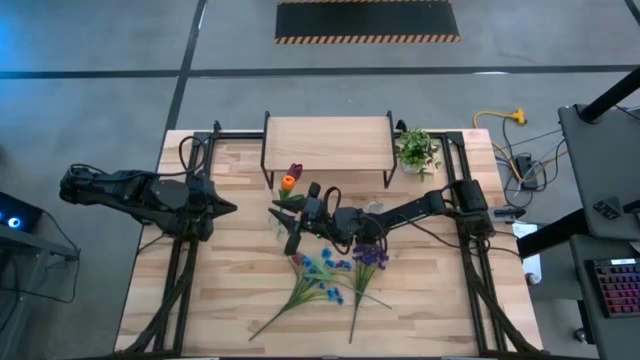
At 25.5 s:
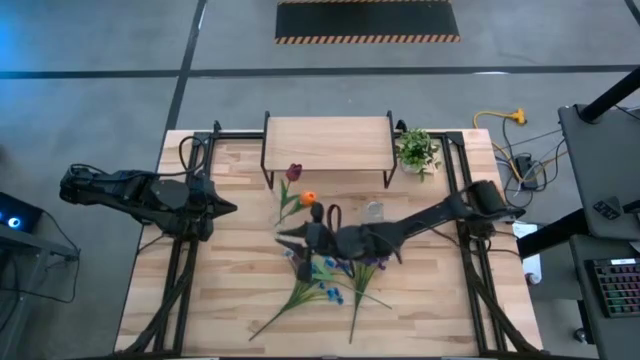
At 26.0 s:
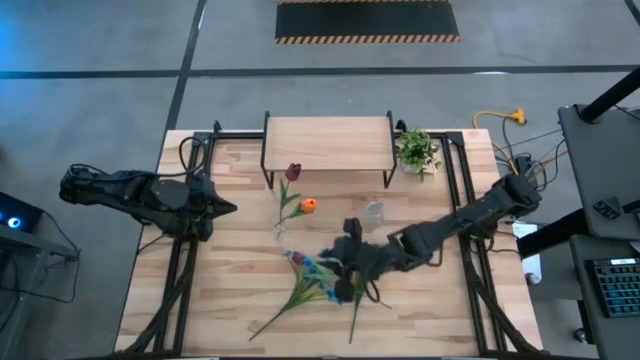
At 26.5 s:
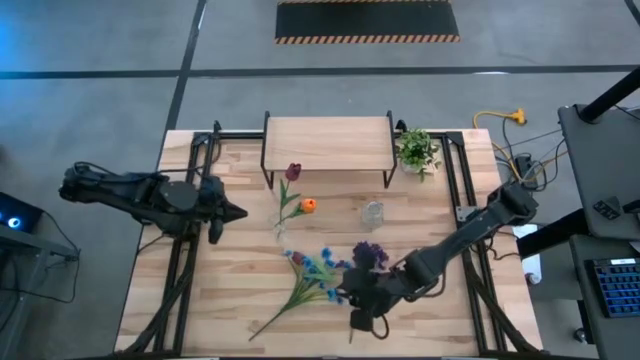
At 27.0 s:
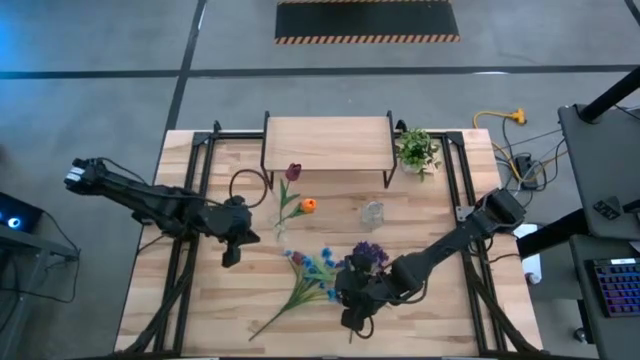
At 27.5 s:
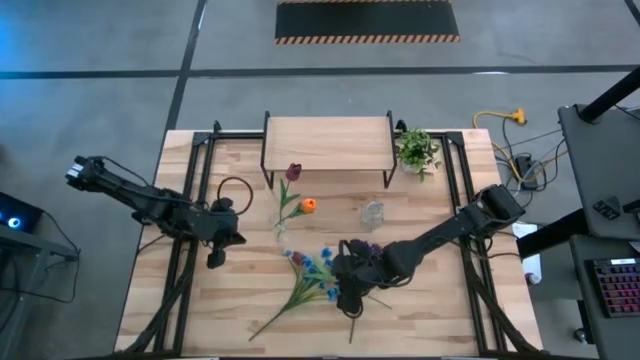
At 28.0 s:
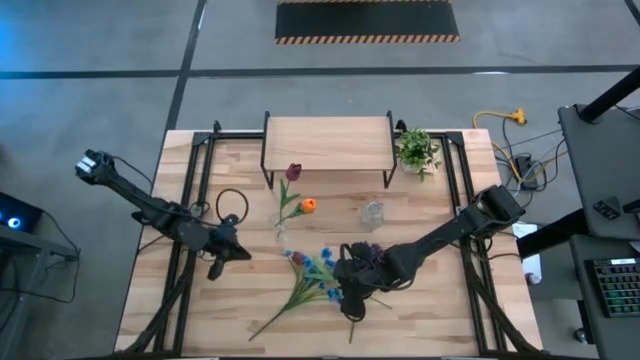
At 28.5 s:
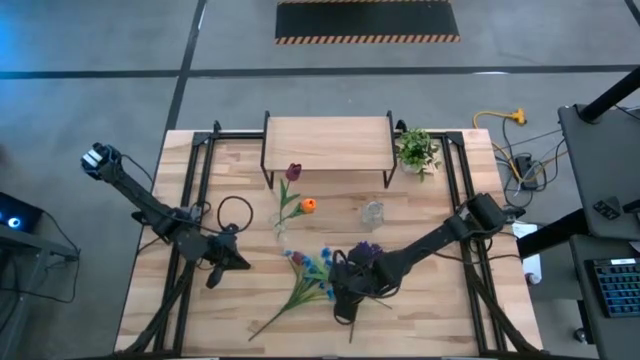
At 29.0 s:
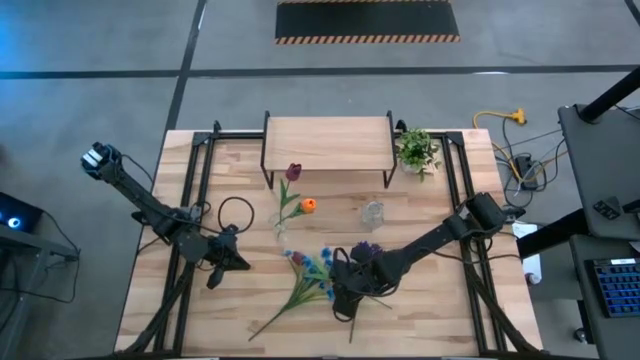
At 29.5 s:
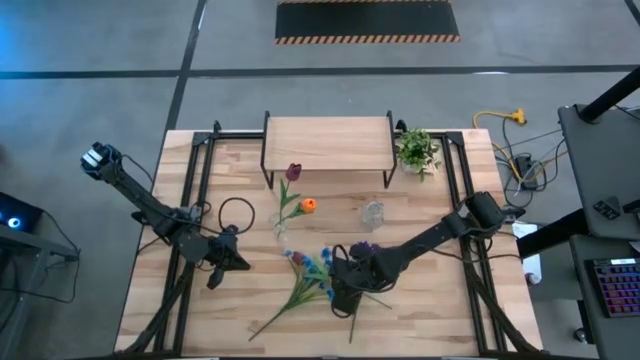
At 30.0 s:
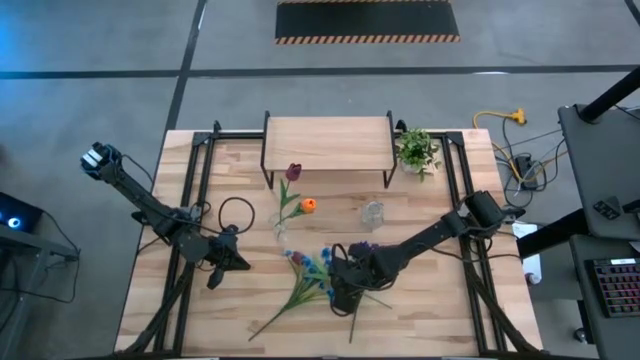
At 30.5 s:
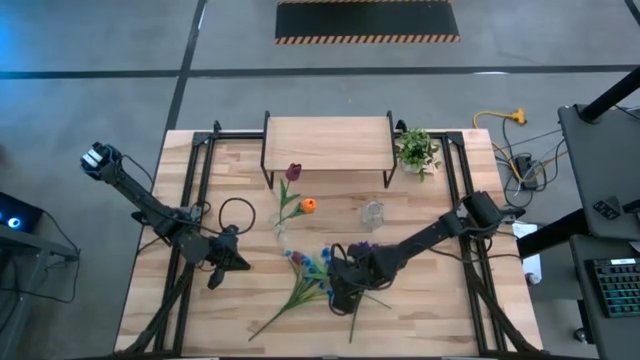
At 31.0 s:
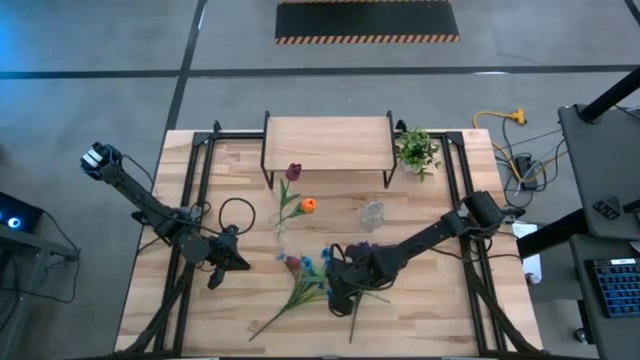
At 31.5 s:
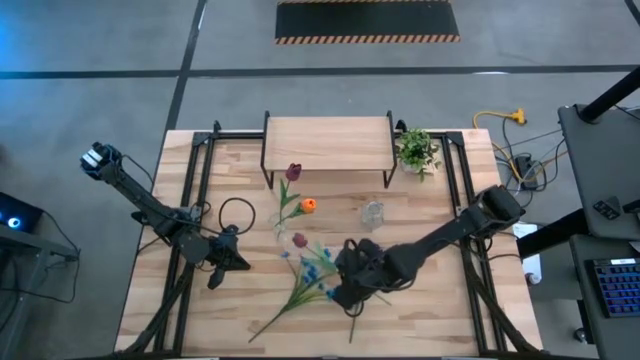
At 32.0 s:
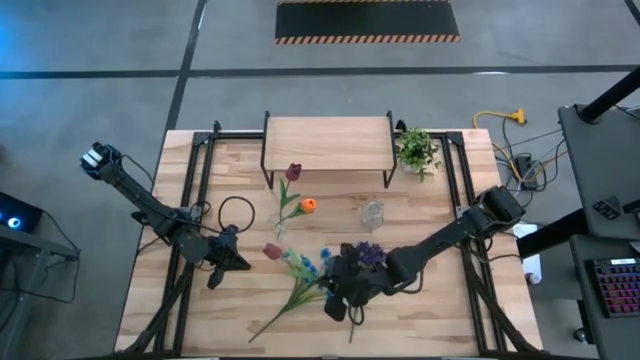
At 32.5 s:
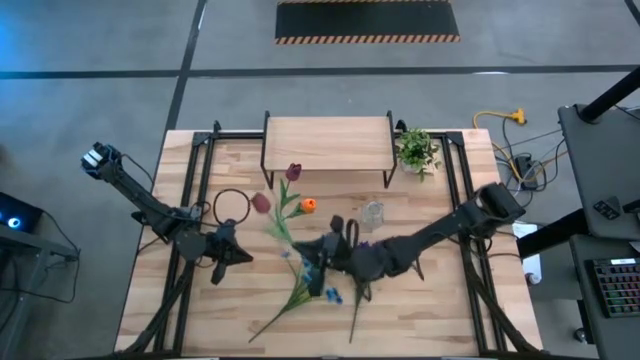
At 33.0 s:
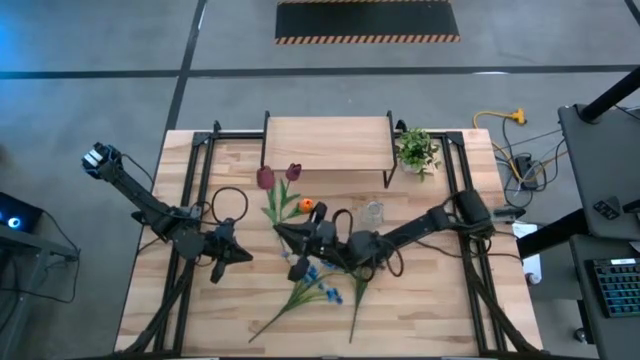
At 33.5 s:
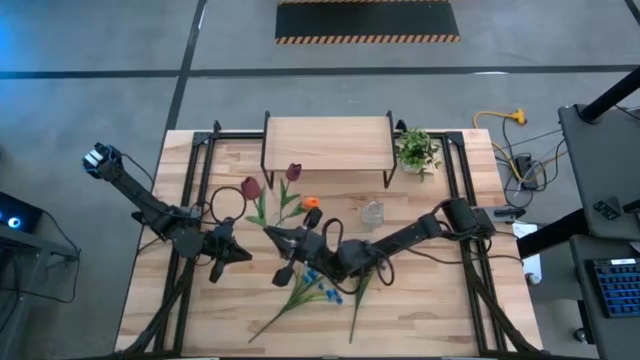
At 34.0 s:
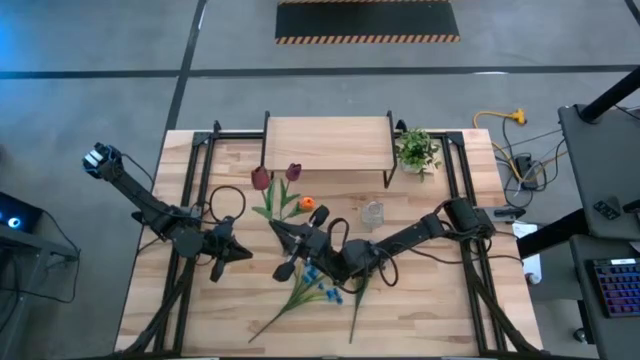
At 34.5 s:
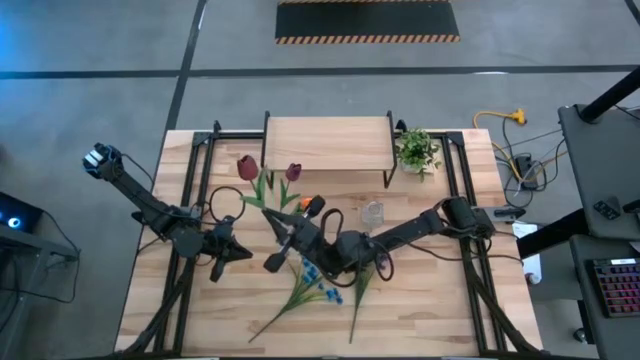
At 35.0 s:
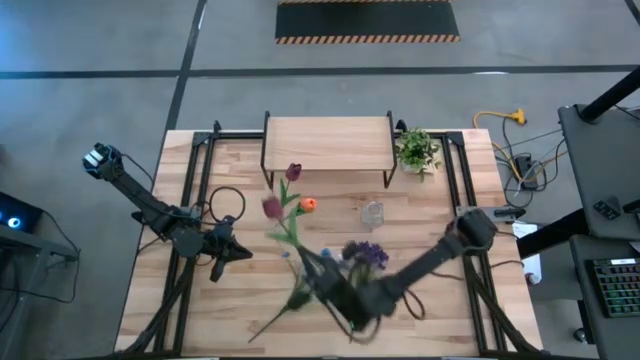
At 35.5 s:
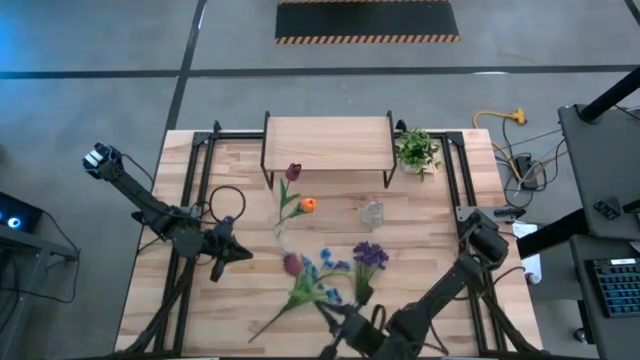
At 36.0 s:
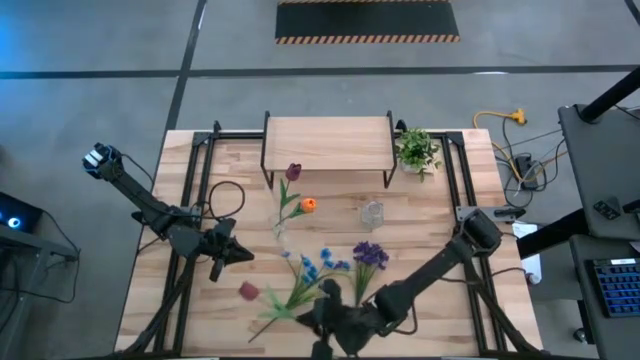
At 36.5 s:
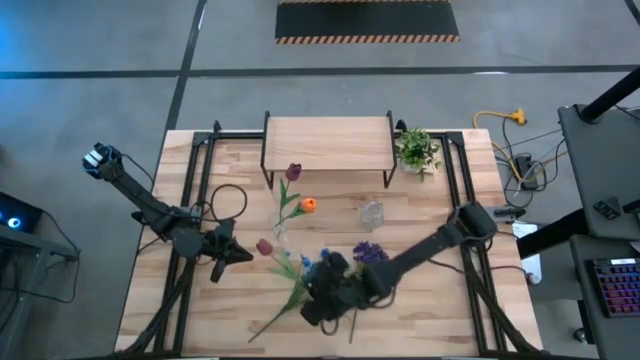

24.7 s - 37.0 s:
Task: Pick and place flowers into a vace then onto a shelf
Put the red tulip into the left transparent vase

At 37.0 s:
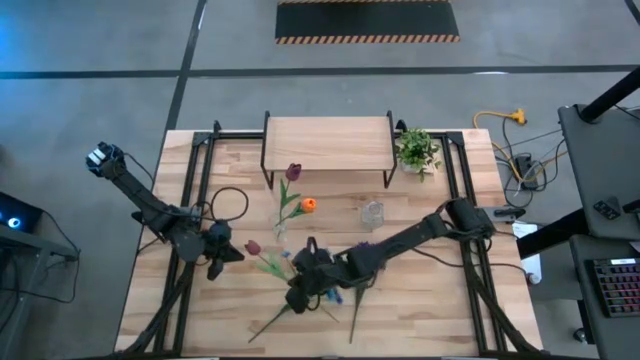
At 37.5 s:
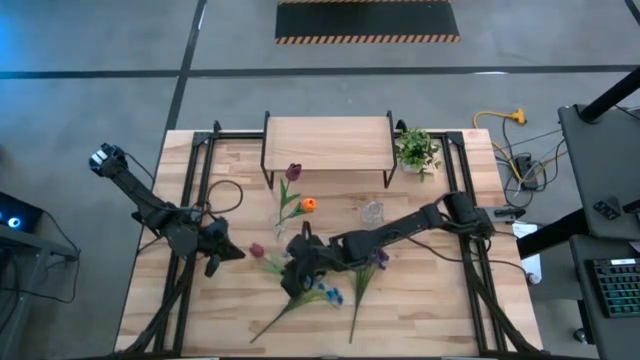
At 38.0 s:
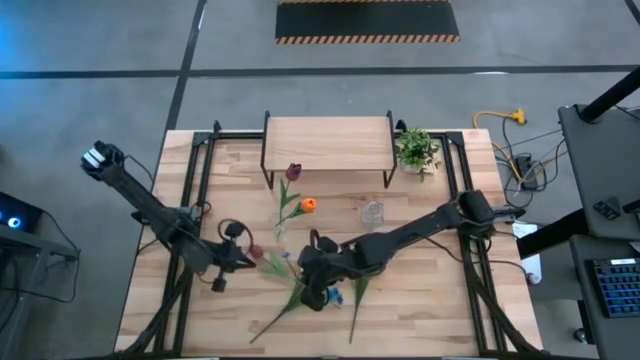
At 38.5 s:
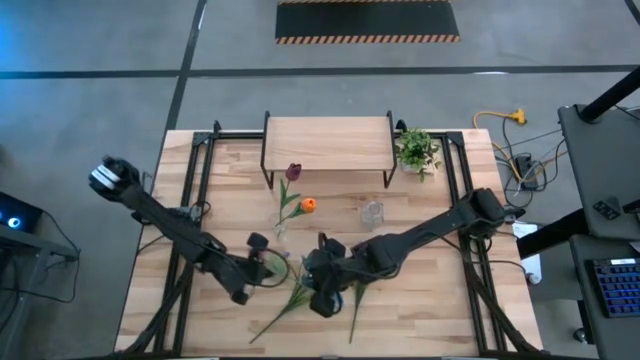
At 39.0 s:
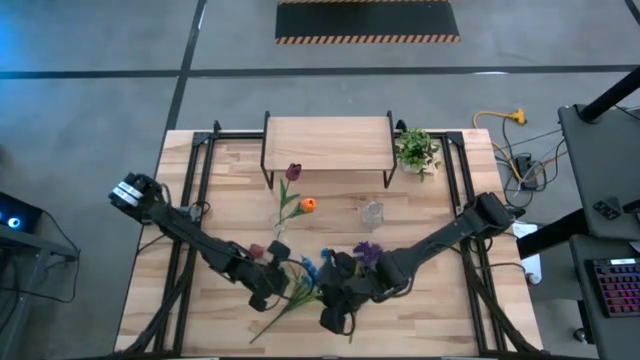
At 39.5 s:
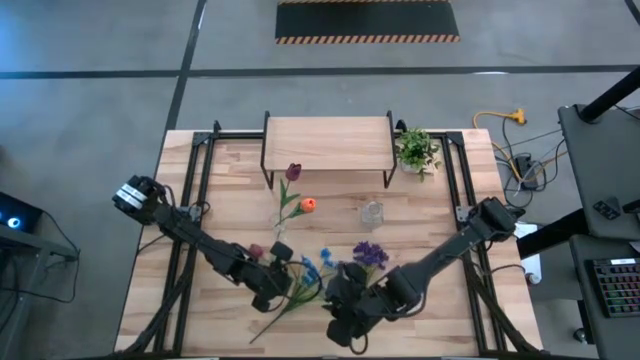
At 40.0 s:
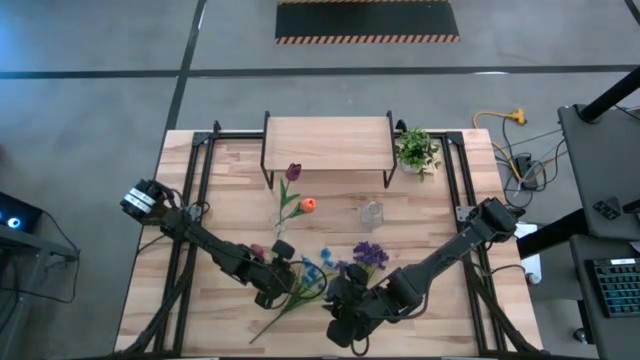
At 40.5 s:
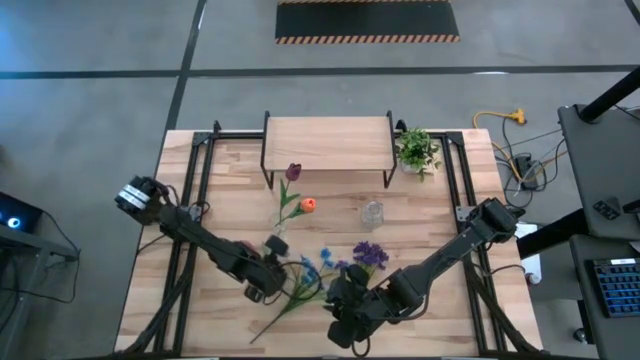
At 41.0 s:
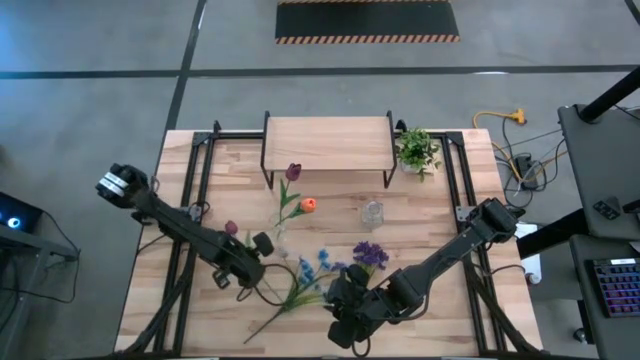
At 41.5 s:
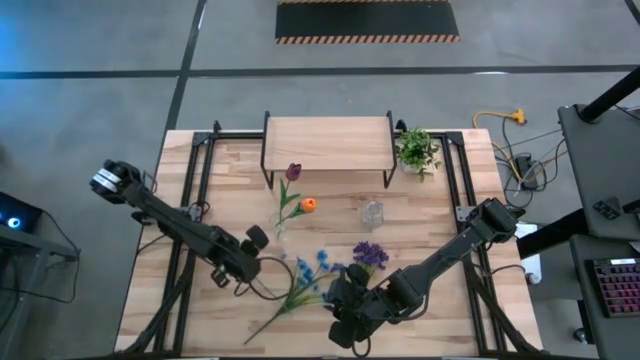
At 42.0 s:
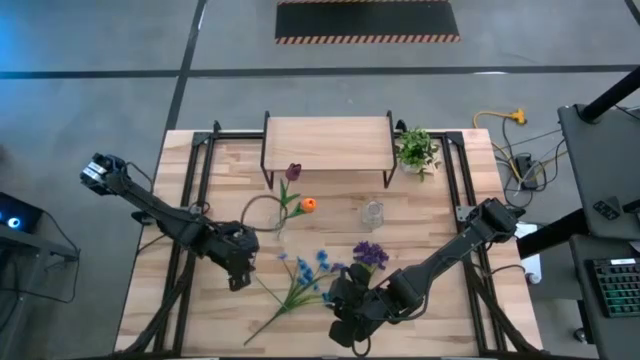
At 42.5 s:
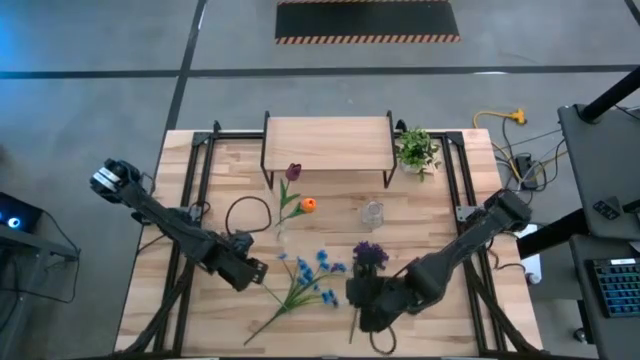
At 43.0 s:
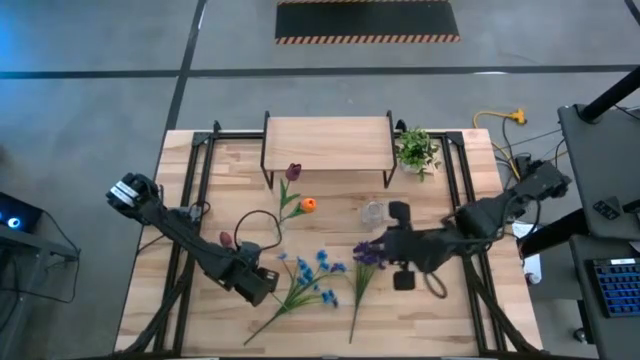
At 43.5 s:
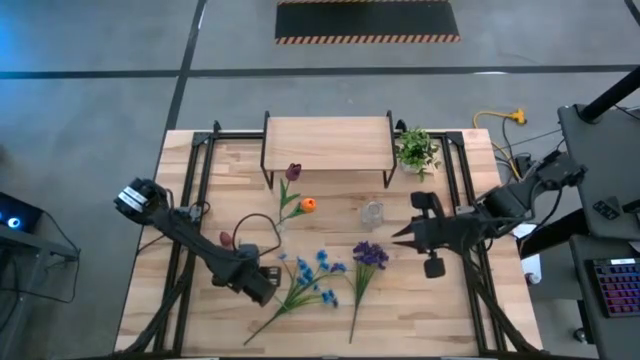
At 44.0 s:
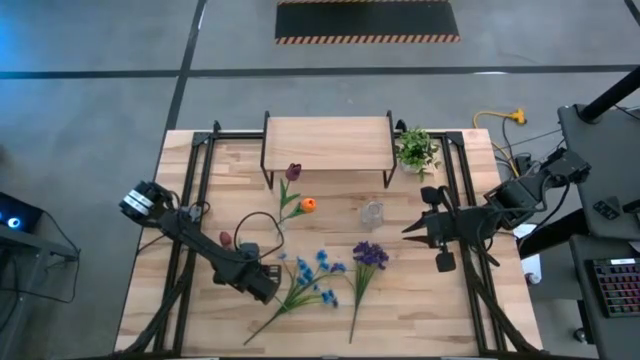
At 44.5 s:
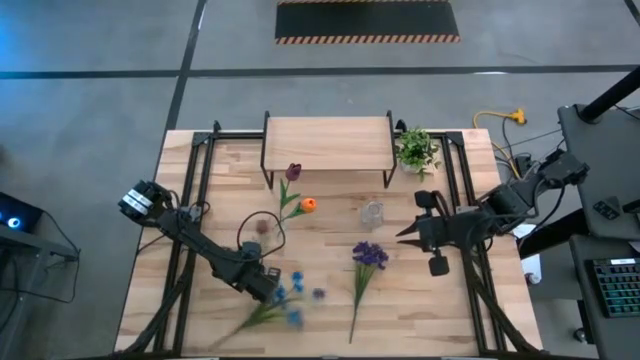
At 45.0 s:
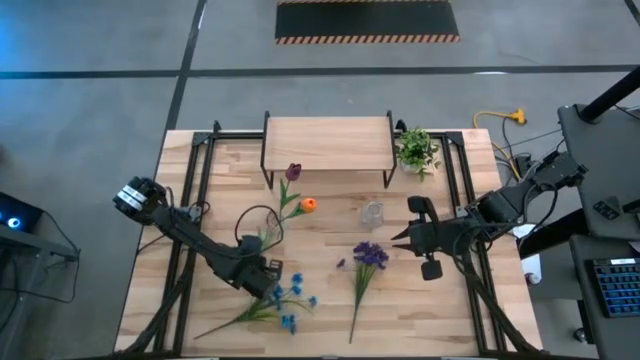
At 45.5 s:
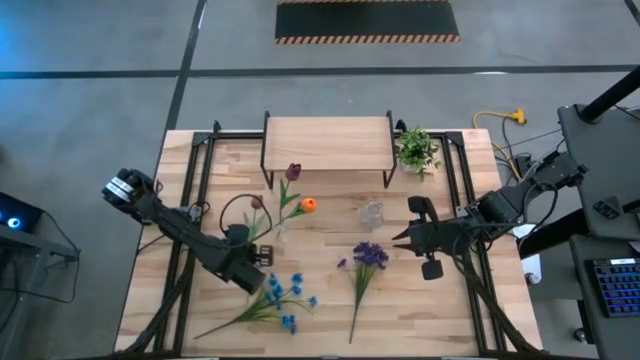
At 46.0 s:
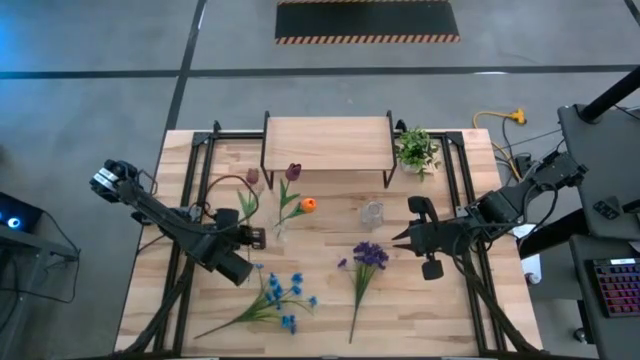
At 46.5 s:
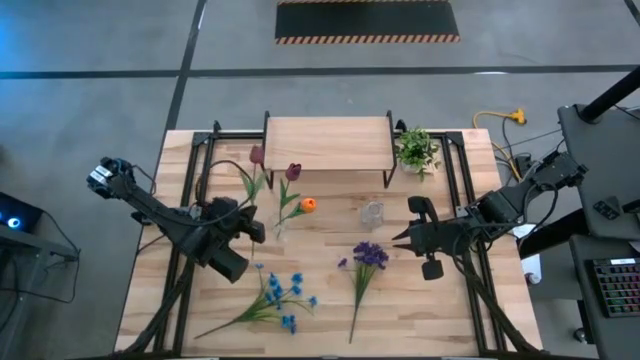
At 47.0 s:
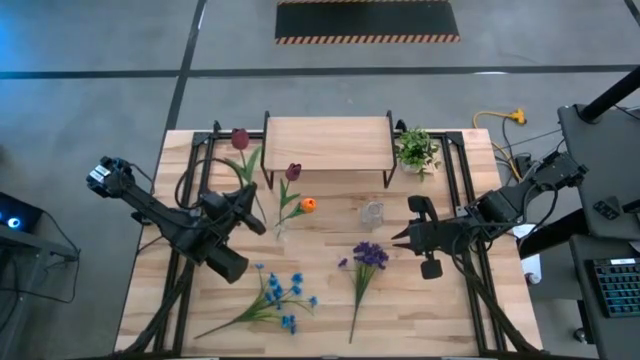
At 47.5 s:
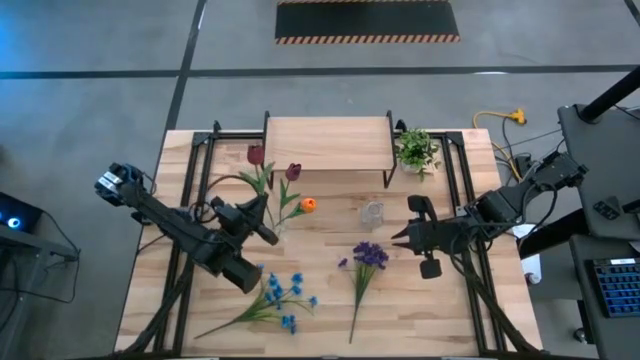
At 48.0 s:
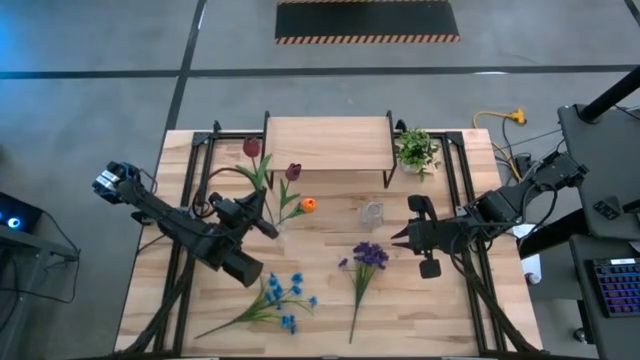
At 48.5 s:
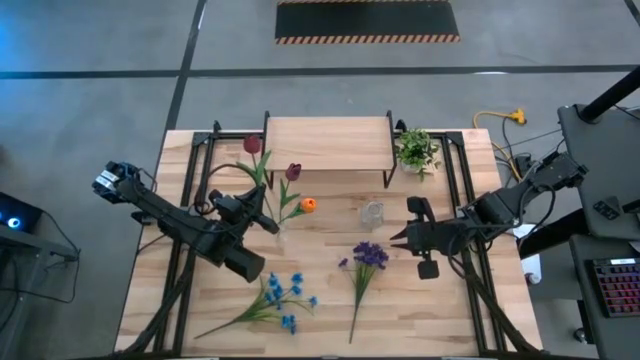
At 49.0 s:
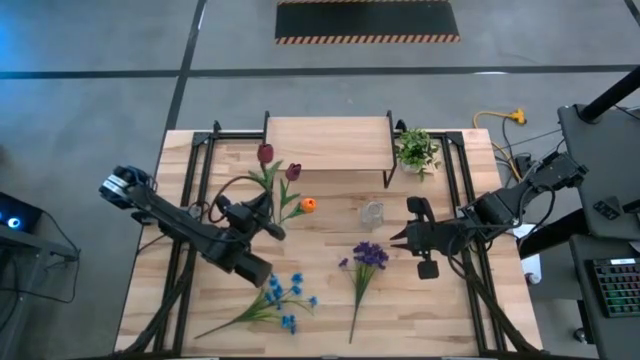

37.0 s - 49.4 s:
Put the red tulip into the left transparent vase
